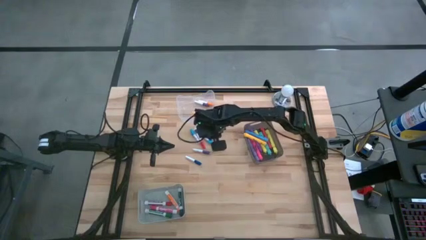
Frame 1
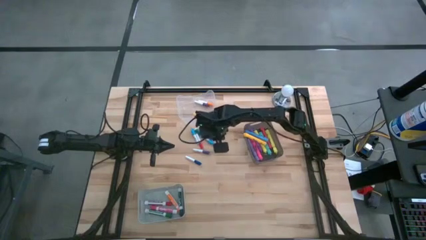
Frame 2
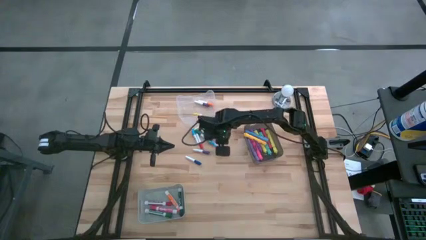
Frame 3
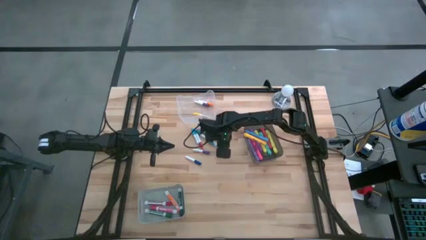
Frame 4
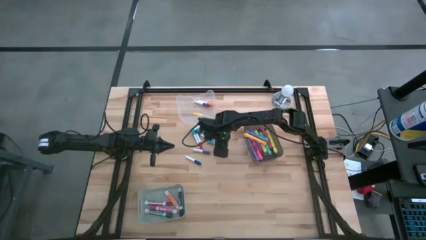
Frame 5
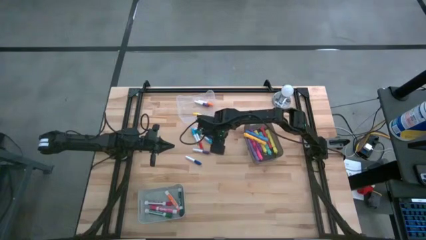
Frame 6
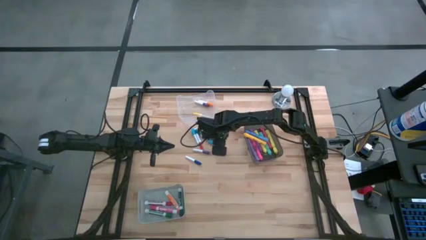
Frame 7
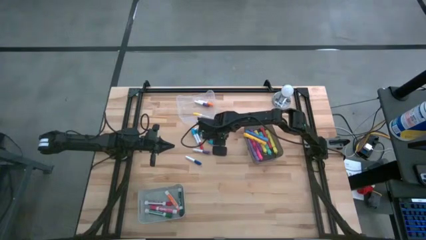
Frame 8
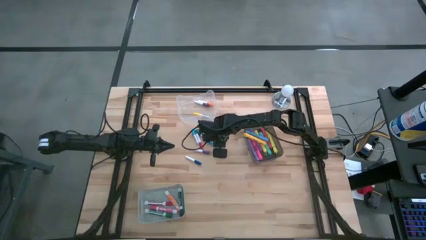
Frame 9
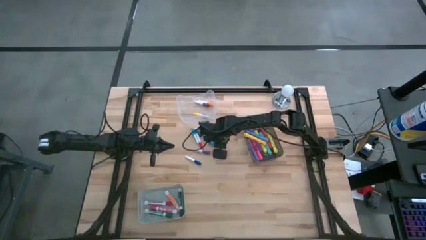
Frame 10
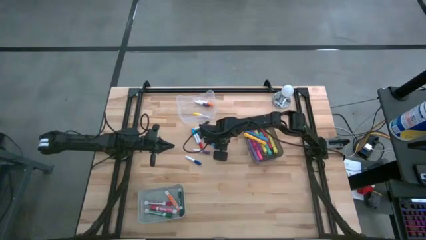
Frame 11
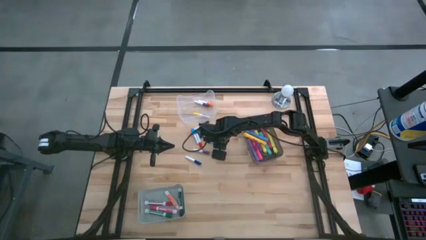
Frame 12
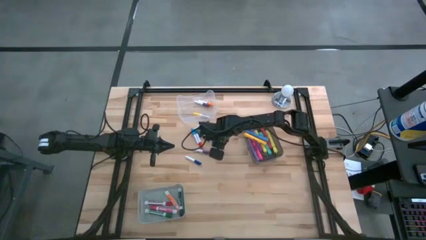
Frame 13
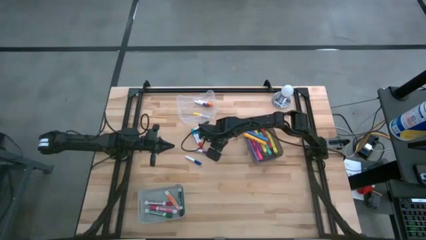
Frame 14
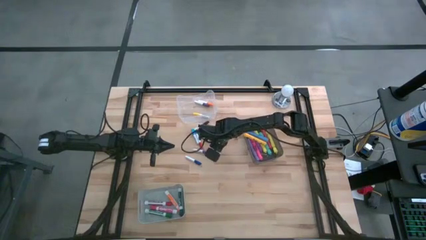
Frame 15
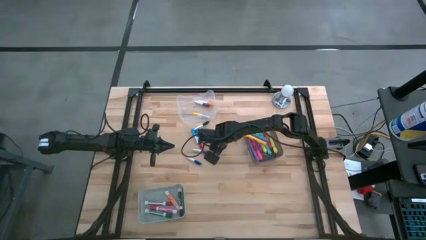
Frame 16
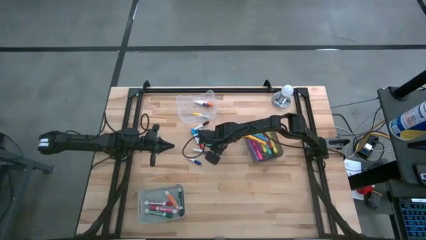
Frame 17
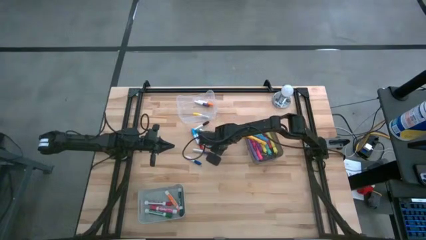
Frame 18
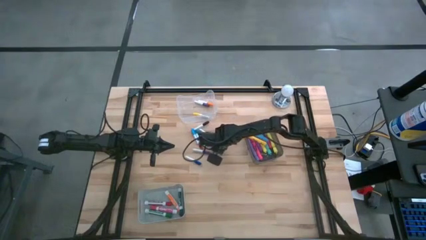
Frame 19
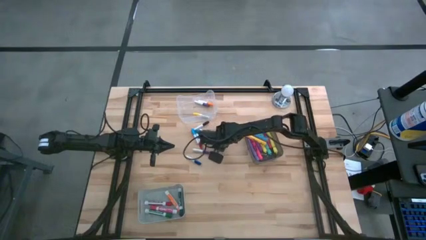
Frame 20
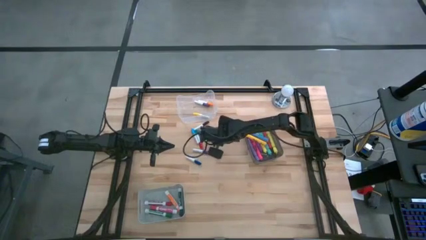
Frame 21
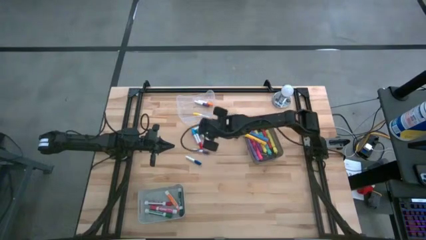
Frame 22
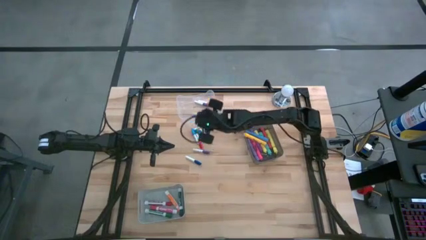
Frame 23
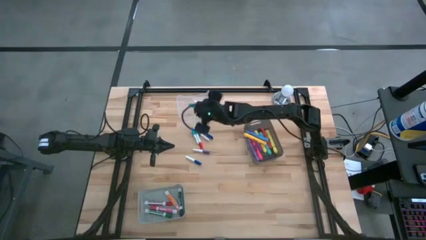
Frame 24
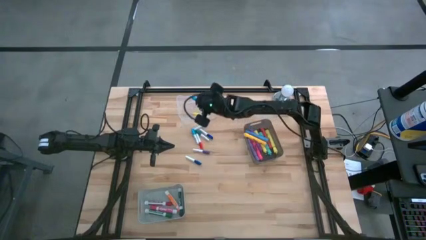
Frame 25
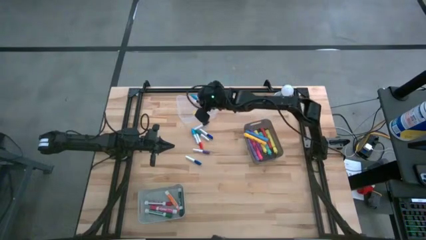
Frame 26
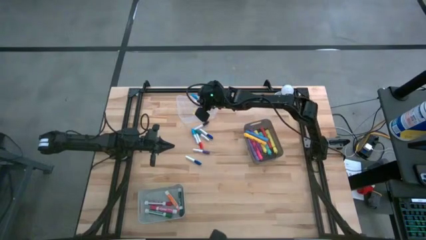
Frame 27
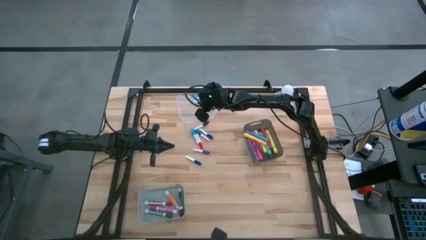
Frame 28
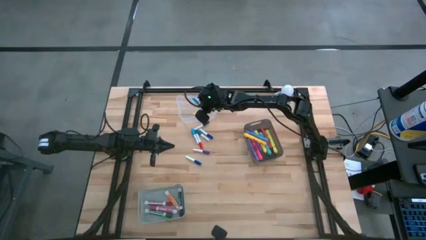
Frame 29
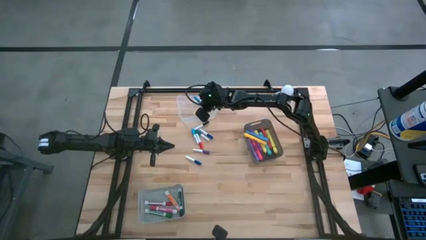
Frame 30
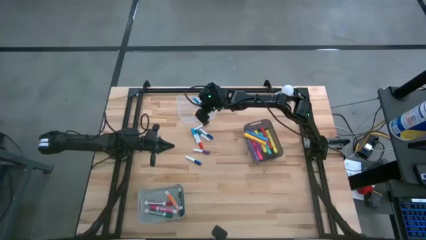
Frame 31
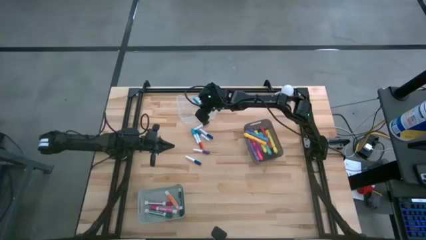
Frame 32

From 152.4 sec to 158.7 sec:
Task: Pick & Place Markers
Put the right white and light blue highlighter pen into the transparent bin

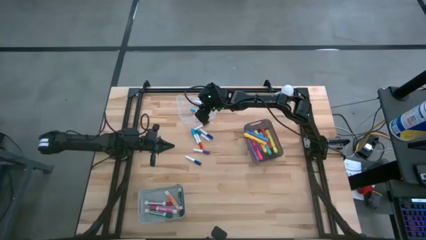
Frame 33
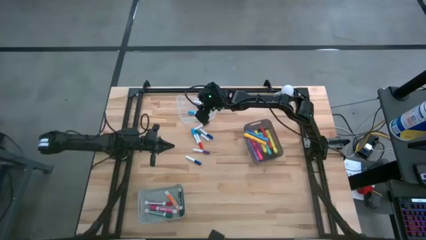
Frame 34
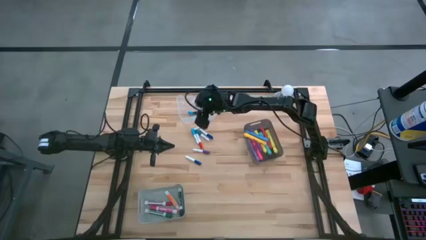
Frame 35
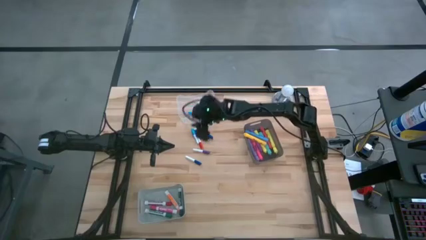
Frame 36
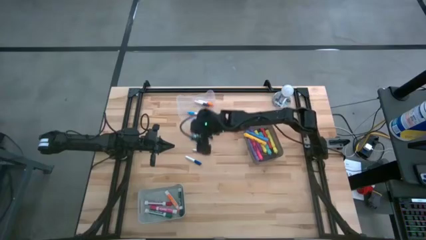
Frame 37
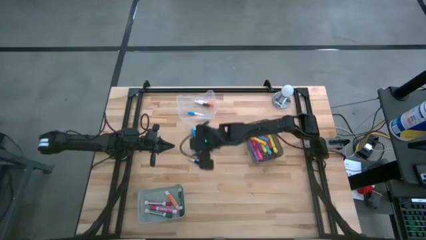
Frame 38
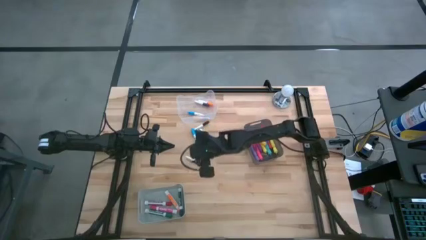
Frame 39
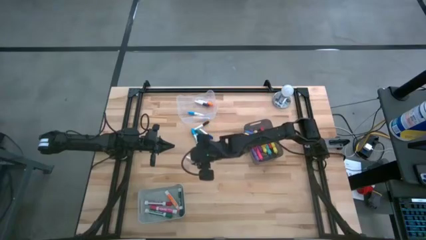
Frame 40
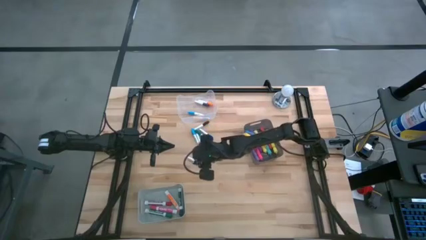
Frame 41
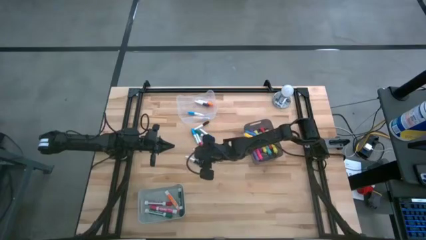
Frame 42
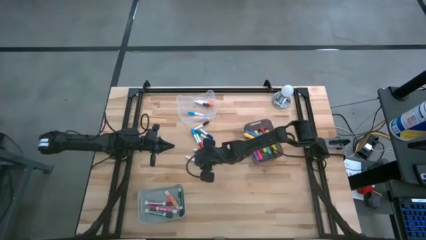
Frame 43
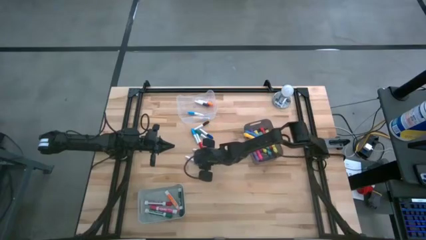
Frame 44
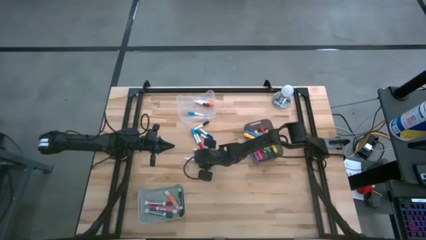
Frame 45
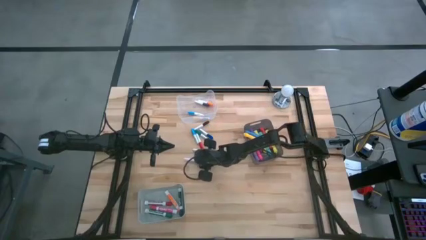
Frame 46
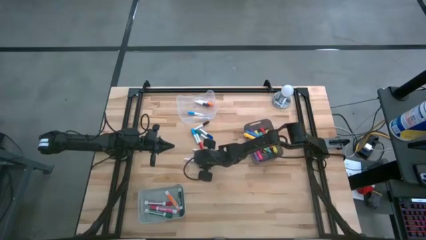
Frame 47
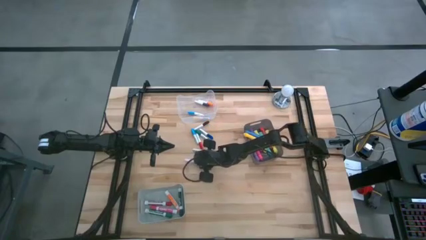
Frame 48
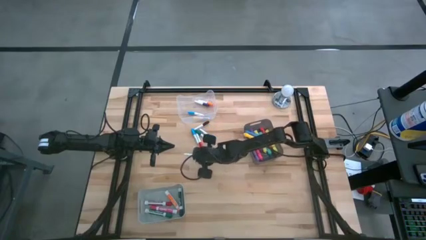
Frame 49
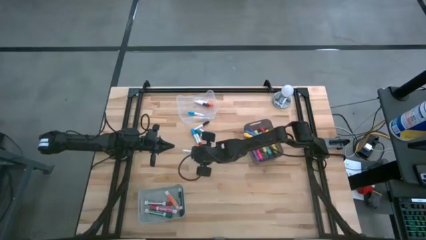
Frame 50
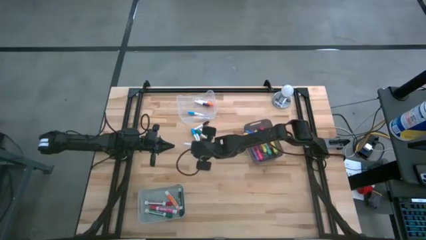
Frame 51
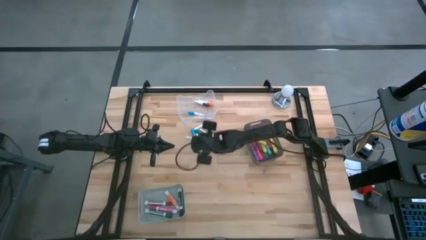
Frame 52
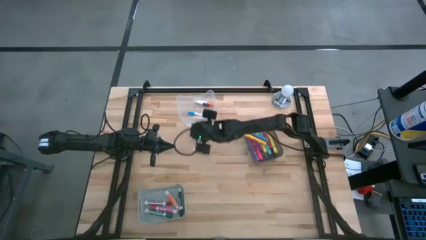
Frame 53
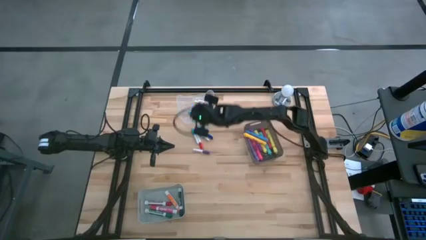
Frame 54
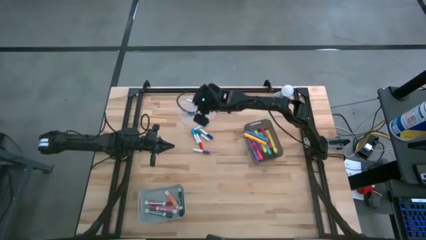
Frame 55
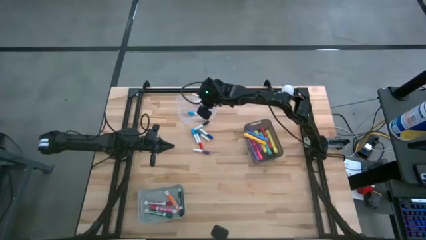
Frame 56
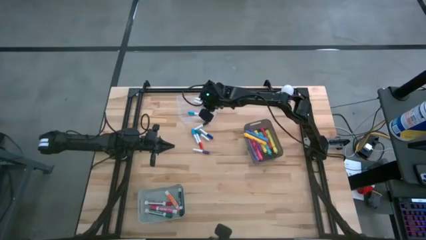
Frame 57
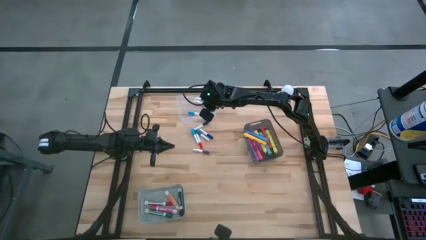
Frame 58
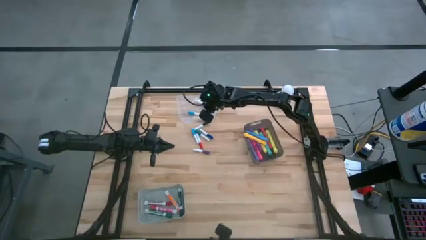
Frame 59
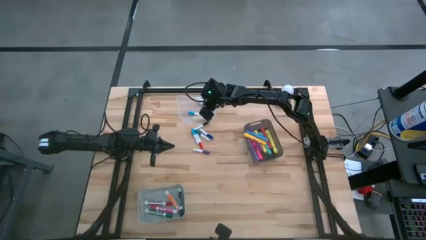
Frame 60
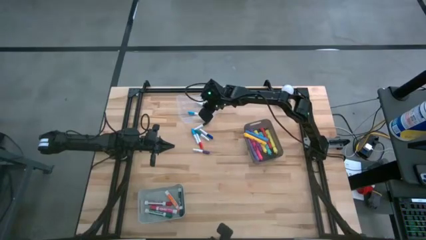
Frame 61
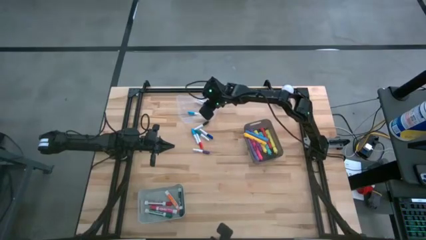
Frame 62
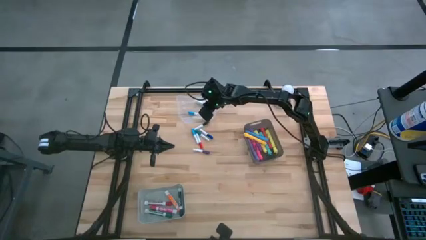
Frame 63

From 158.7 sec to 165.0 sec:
Put the bottom white and blue highlighter pen into the transparent bin

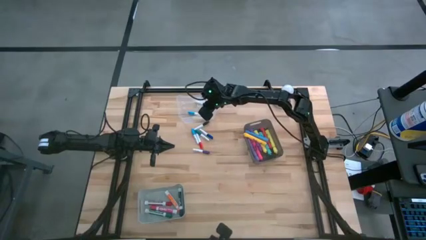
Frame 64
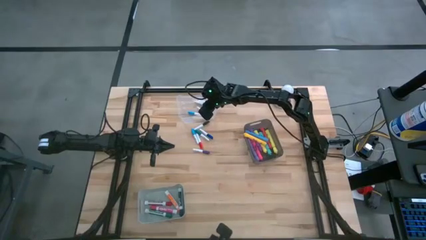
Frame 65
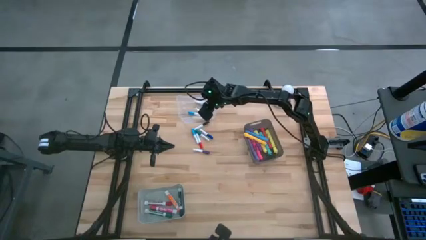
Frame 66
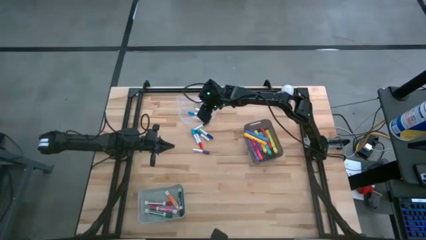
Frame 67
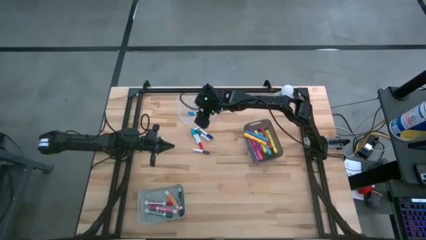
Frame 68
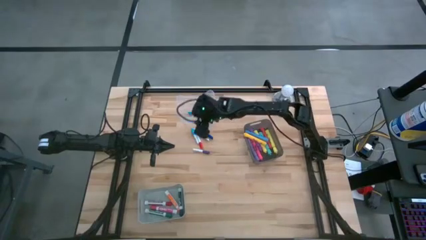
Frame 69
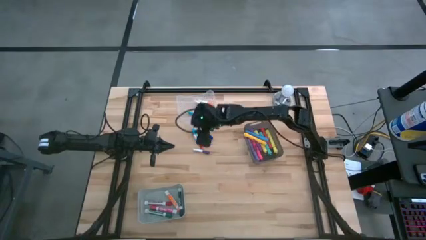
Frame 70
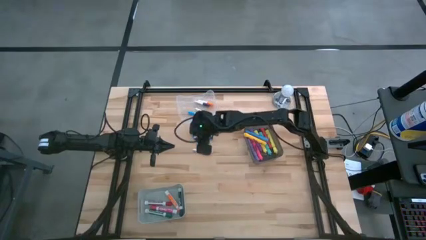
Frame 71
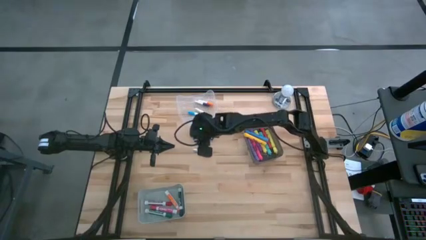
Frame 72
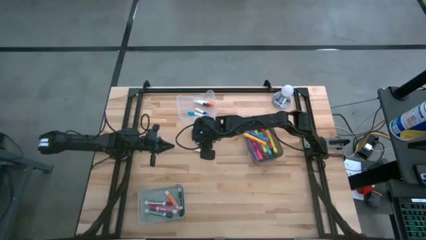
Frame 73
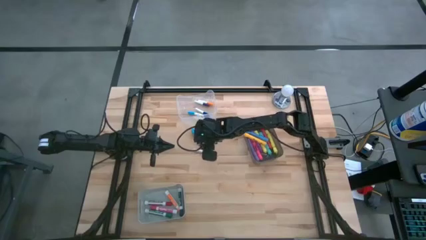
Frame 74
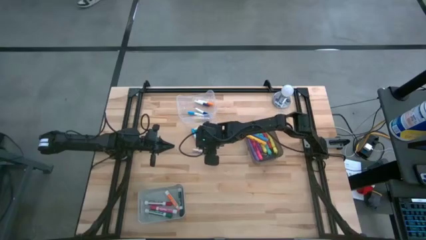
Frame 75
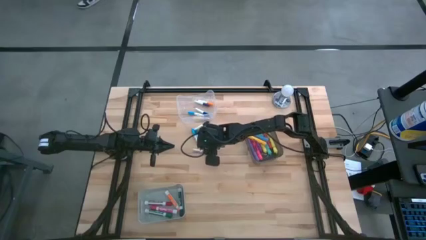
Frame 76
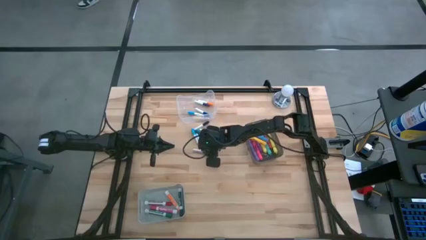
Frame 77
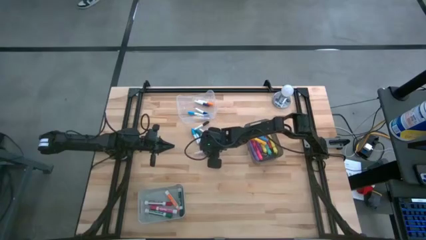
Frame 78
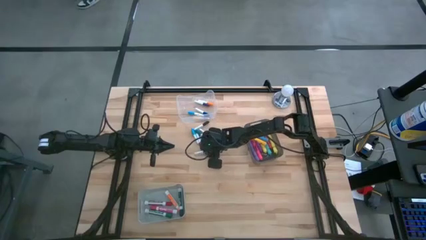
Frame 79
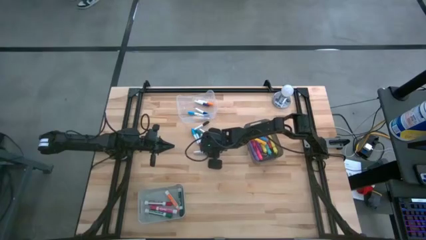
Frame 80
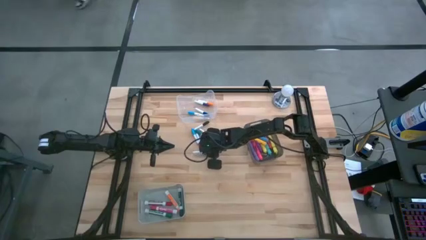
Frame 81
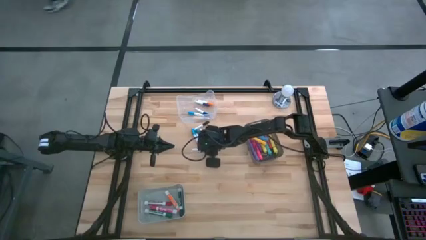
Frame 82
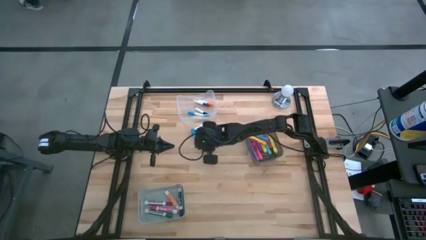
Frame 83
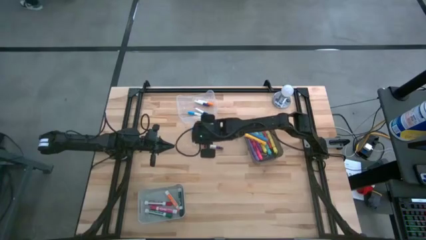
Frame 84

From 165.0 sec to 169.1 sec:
Put the white and violet highlighter pen into the transparent bin

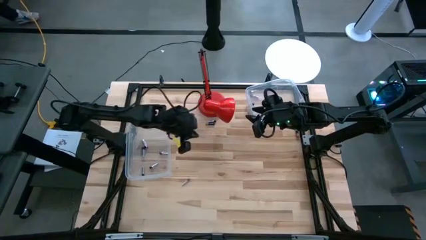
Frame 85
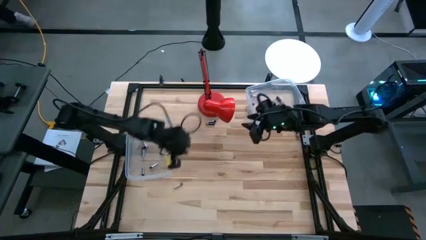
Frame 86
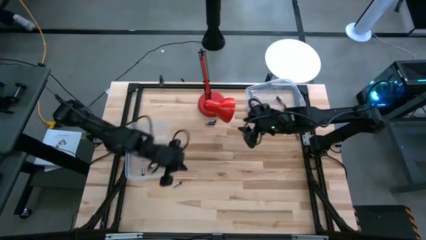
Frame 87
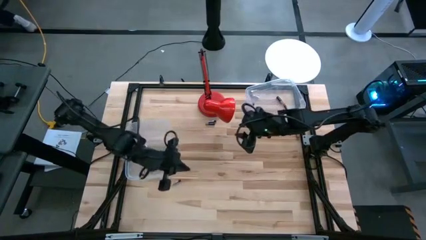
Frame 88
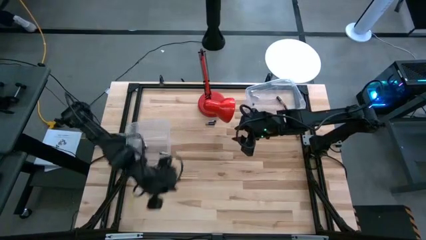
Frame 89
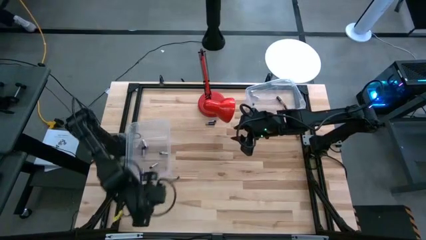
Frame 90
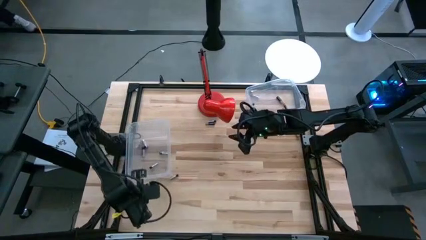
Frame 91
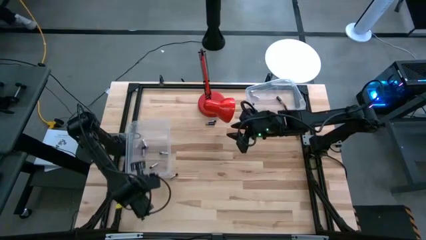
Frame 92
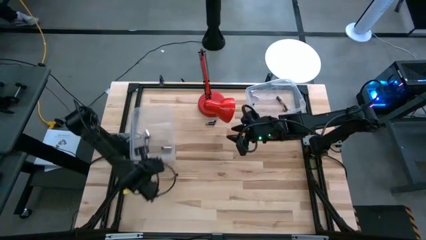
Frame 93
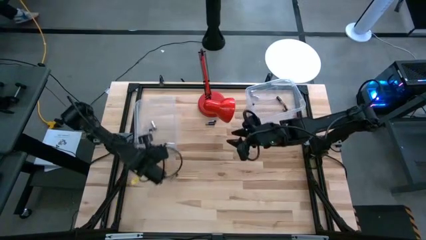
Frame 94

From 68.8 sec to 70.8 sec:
Task: Sort batteries
Adjust the bottom transparent bin
